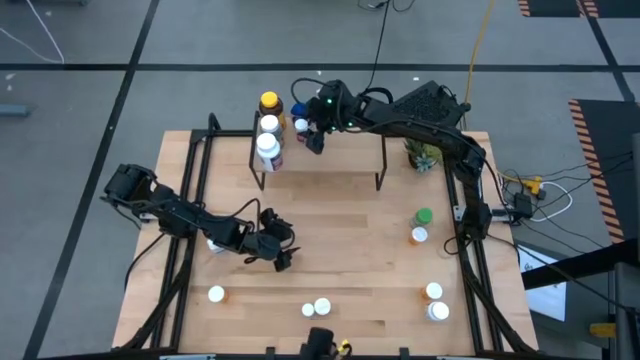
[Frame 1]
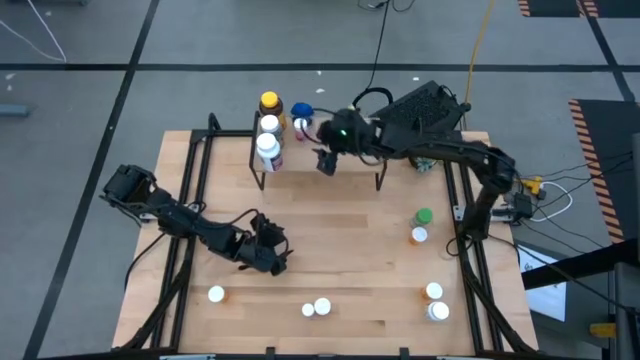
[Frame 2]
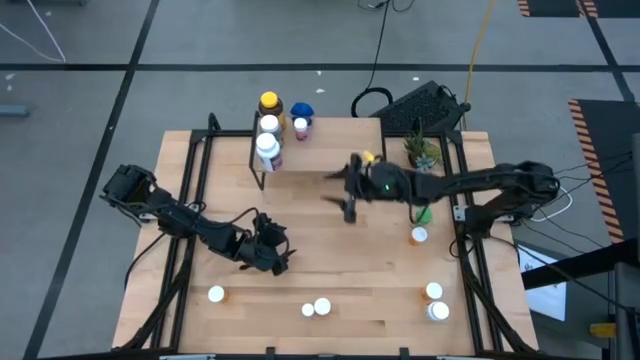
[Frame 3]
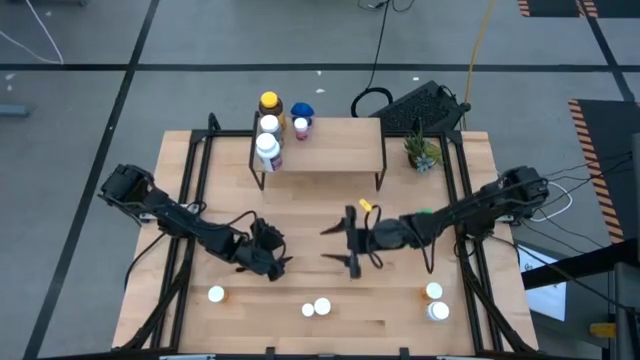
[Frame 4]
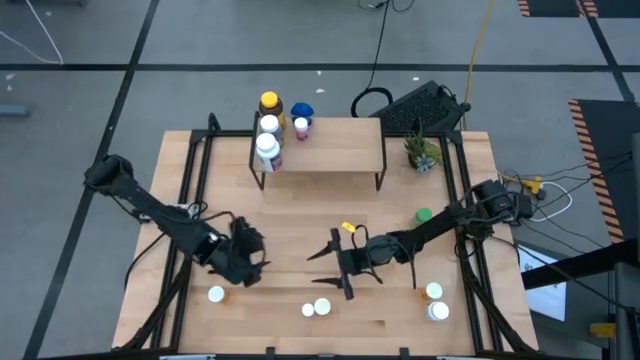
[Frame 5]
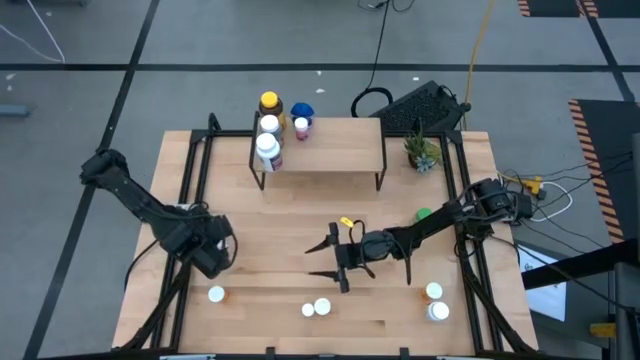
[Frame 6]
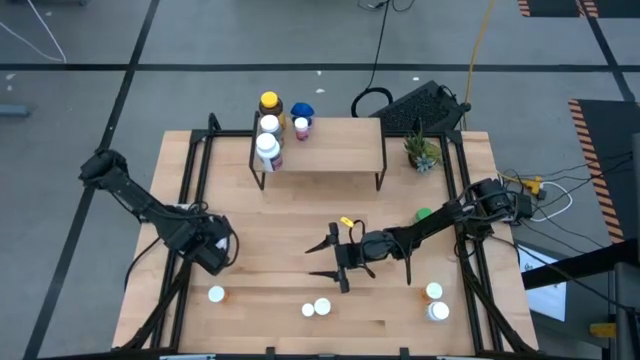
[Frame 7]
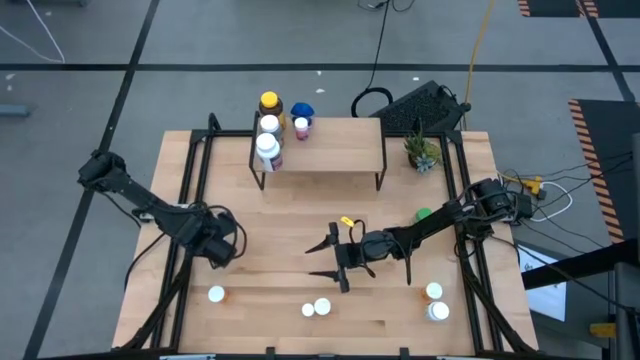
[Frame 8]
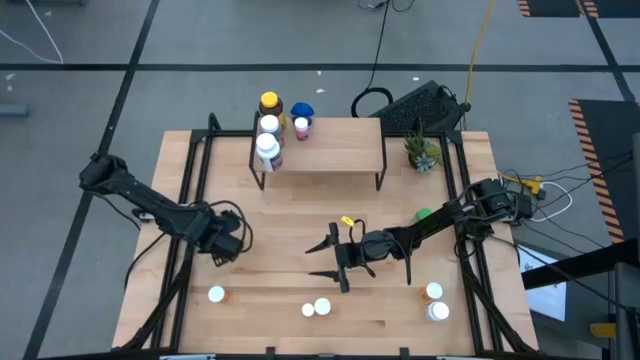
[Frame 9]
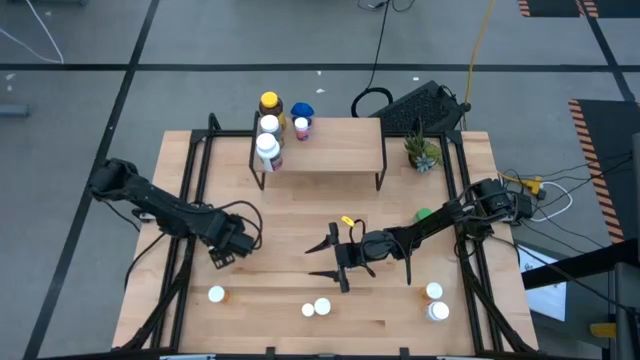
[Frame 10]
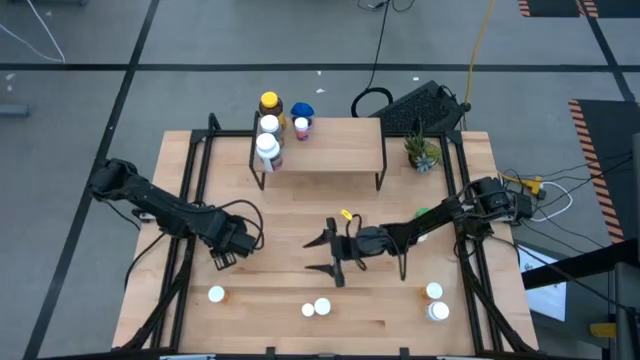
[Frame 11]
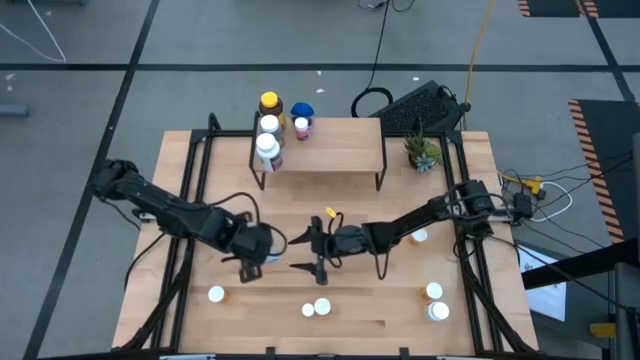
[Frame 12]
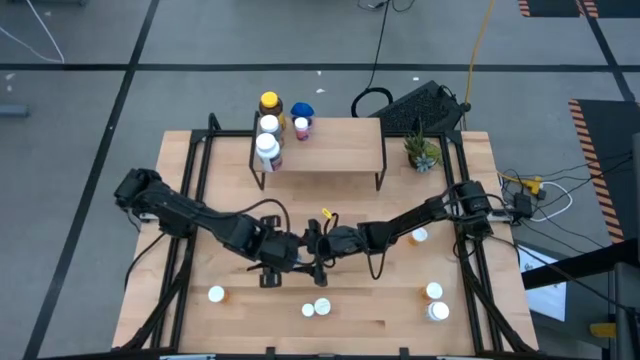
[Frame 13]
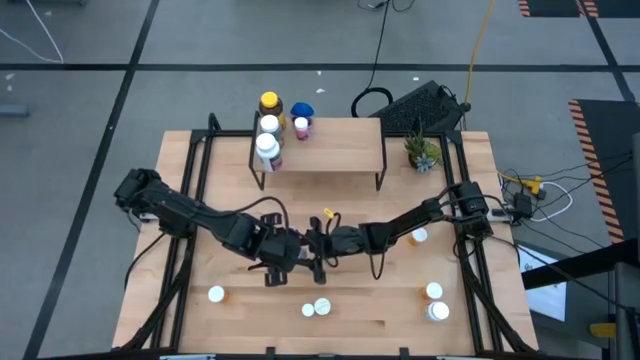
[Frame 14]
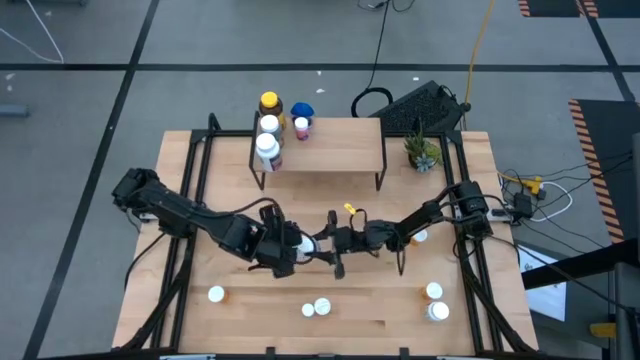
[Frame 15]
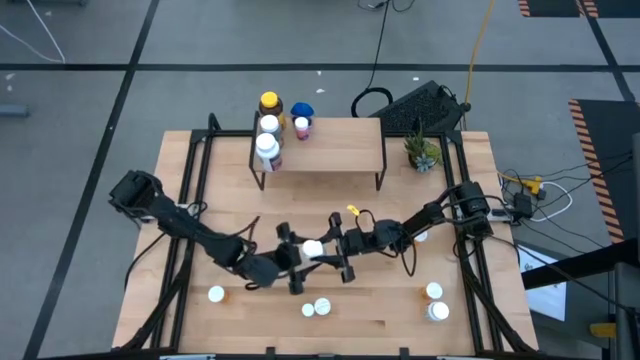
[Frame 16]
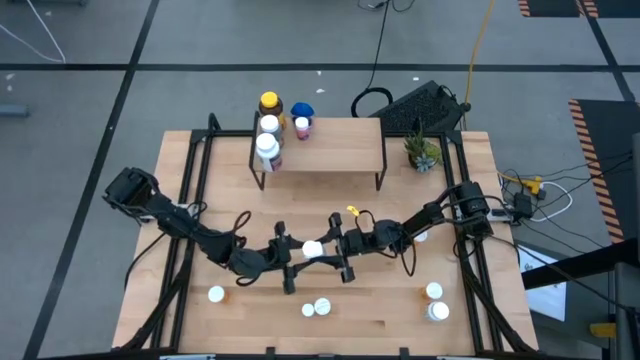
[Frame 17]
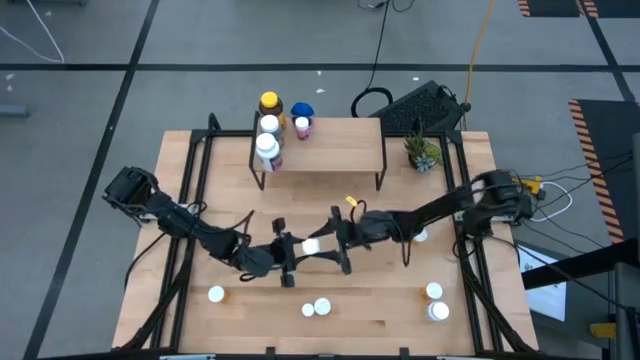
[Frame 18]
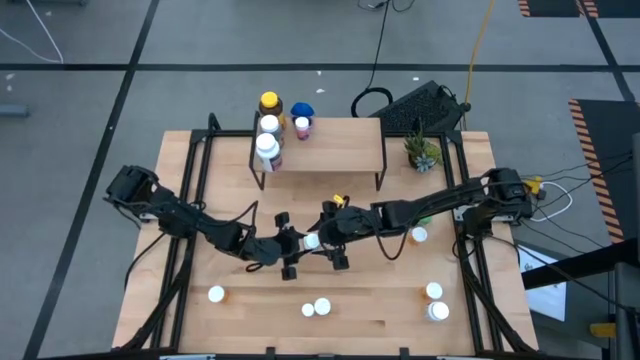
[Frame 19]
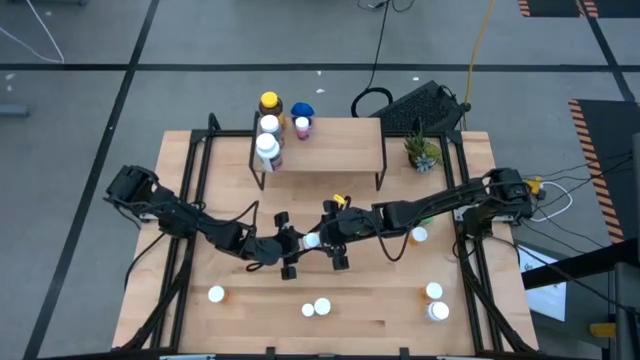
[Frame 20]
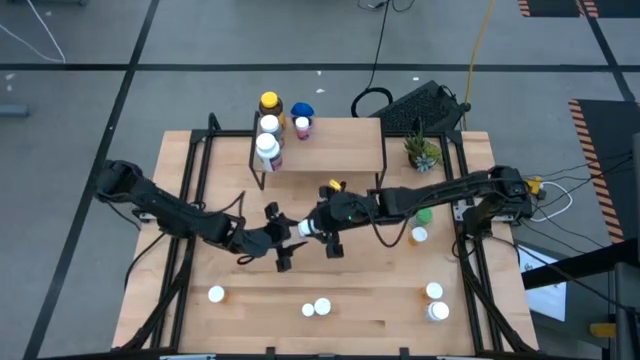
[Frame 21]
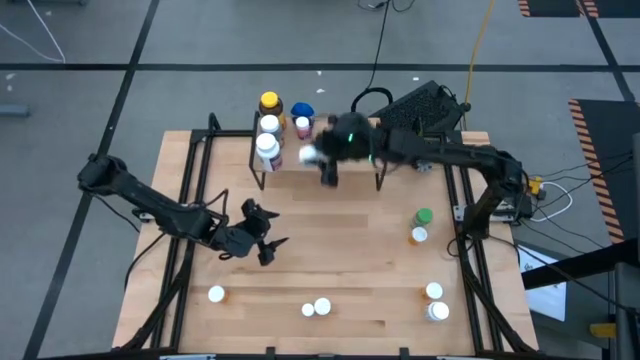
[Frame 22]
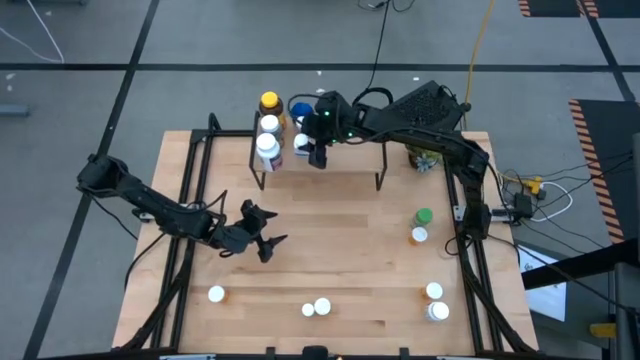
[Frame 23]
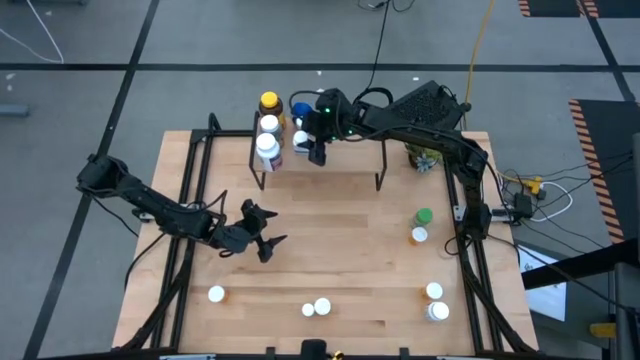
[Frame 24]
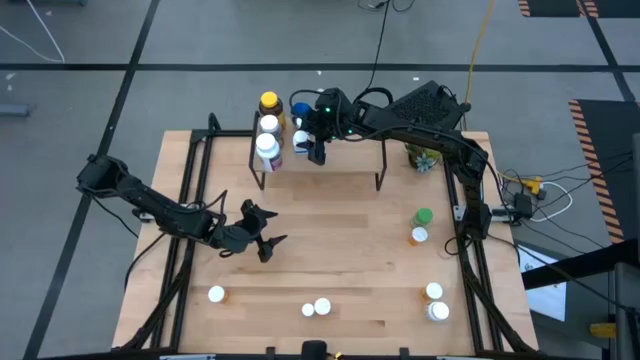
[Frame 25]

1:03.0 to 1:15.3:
Task: Pick and place medicine bottles onto shelf by color
Put the top small white medicine bottle on the shelf, aligned with the other blue and pink medicine bottles

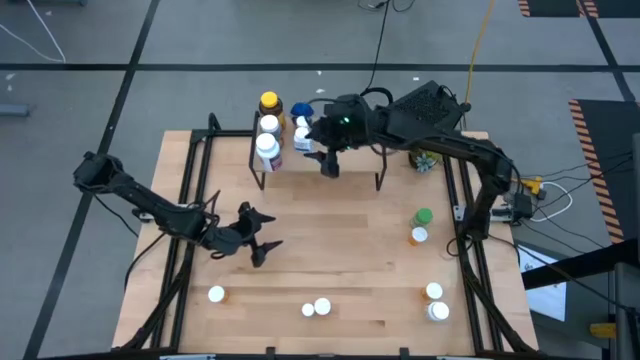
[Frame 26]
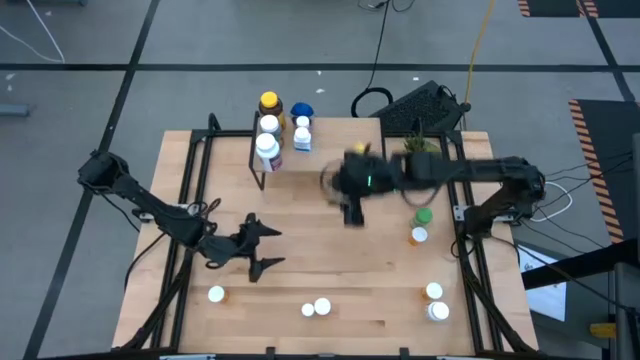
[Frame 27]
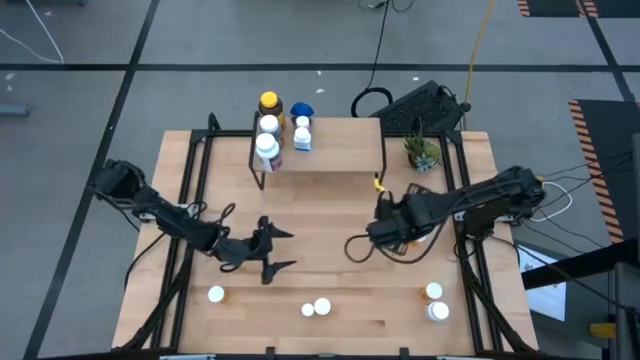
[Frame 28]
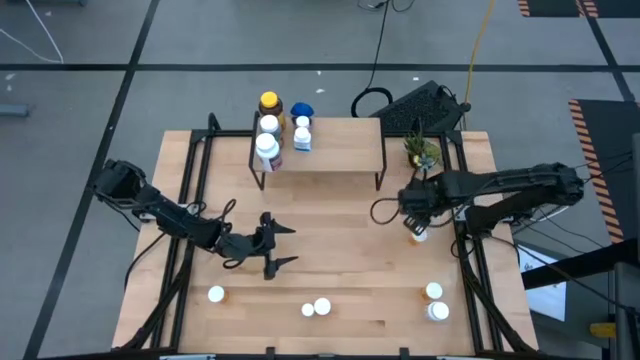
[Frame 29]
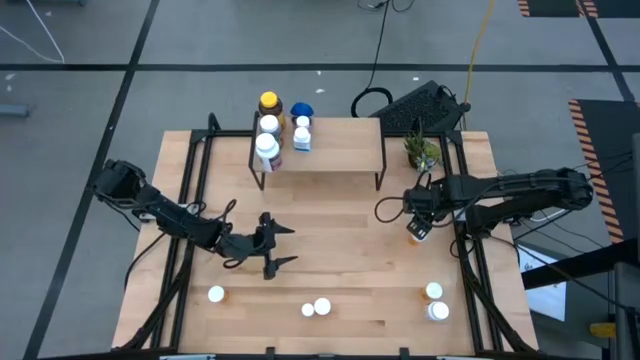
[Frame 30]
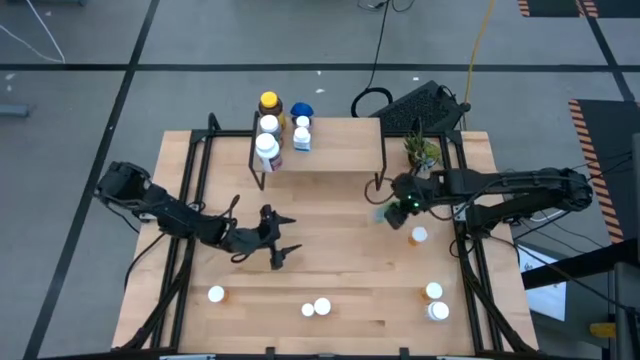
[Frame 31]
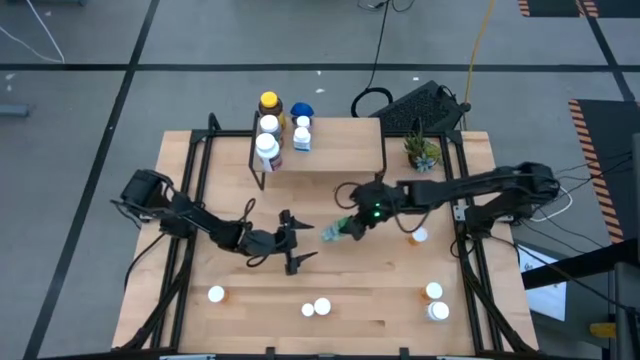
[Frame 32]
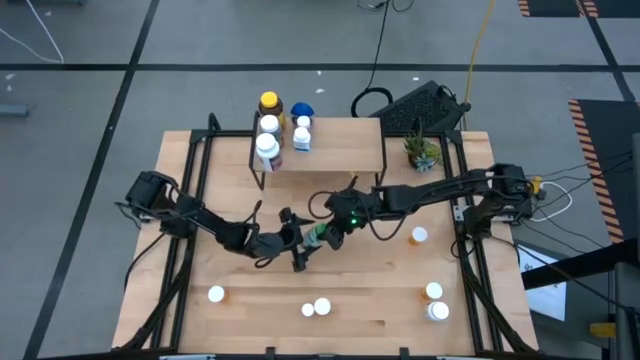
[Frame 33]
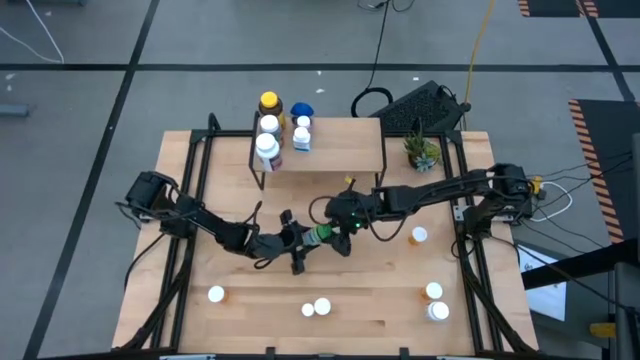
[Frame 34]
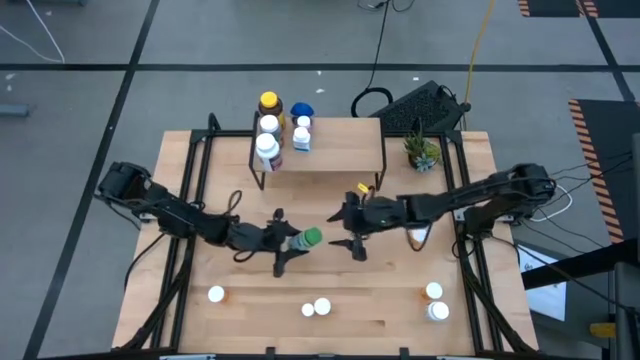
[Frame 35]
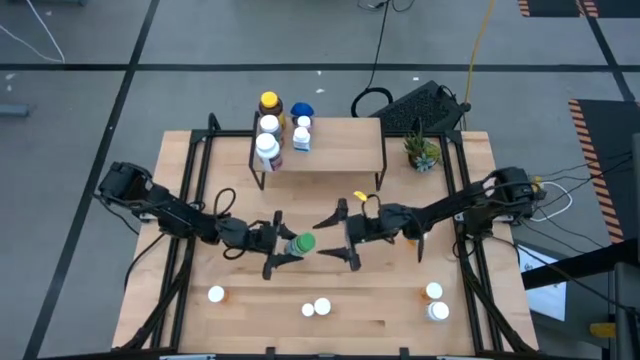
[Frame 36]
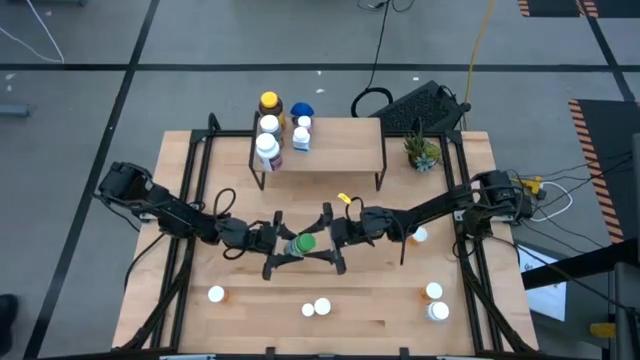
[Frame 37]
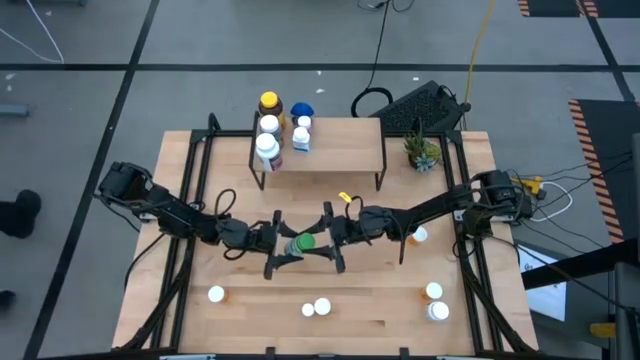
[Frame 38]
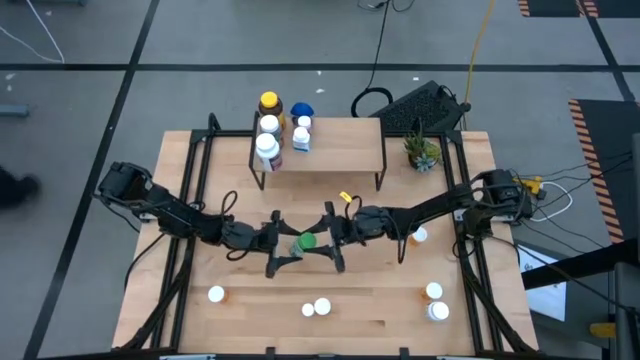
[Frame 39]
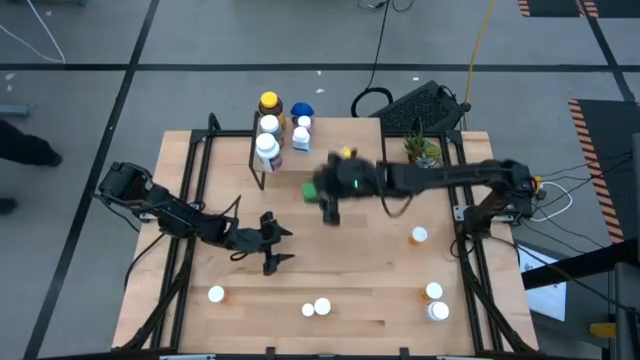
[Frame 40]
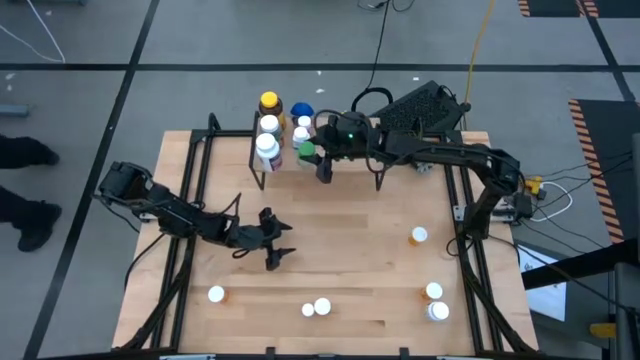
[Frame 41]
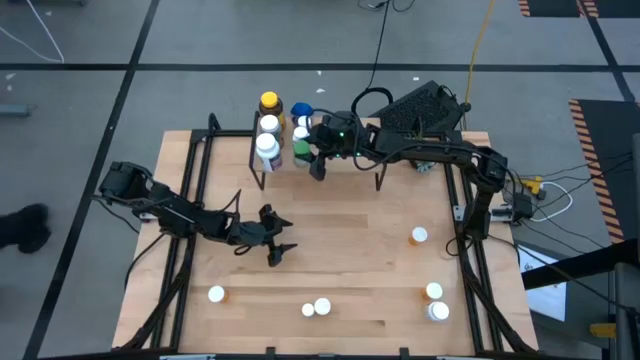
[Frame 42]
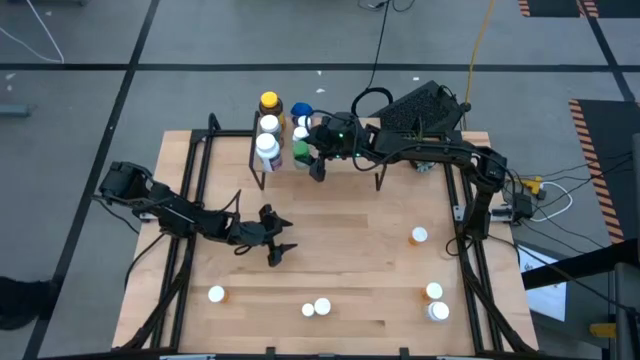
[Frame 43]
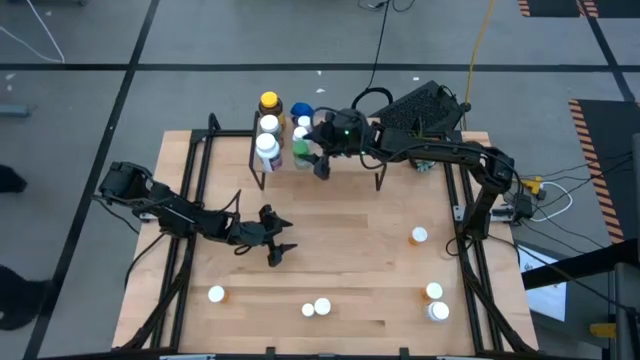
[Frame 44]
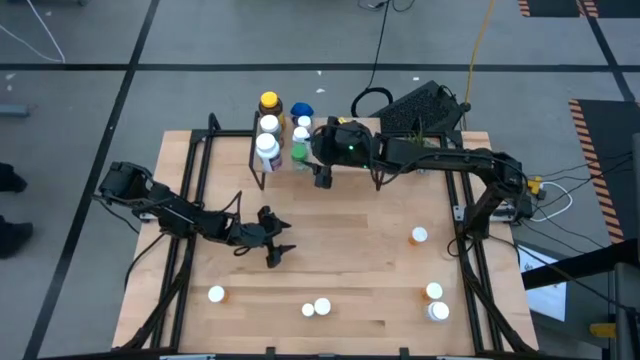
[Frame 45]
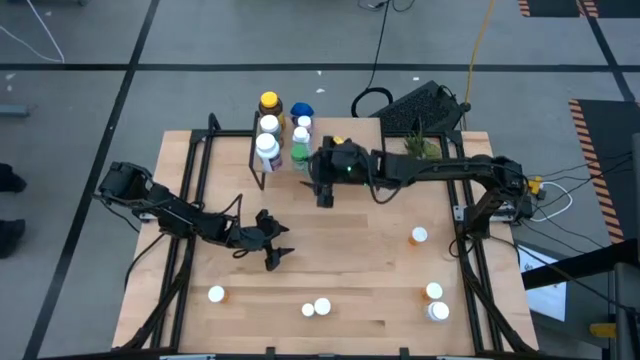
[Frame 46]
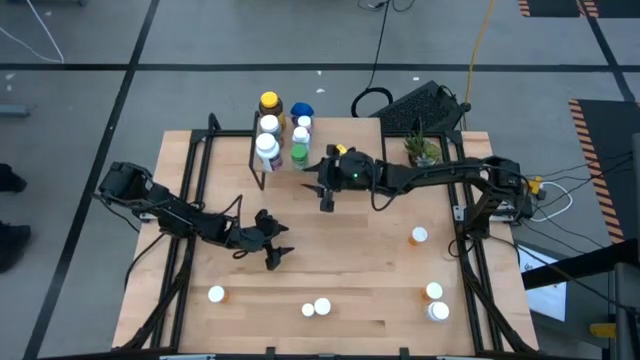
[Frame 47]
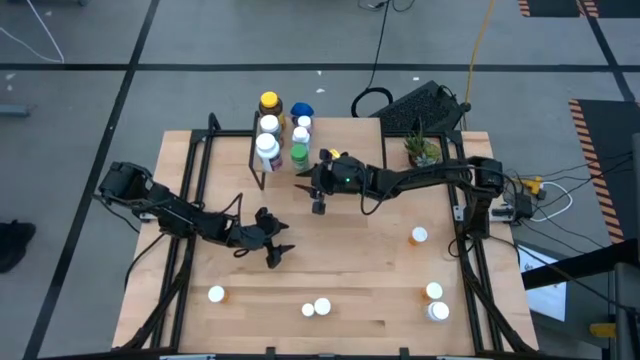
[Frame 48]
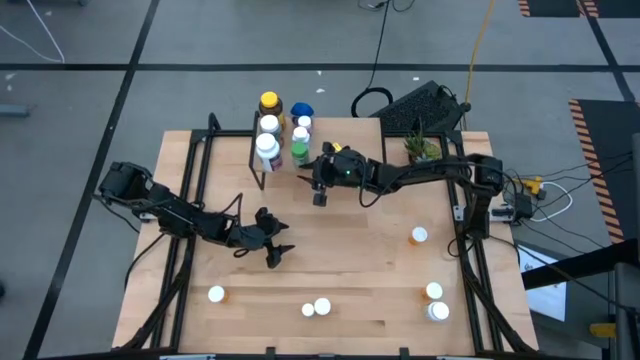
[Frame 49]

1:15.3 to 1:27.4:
Put the small green medicine bottle on the shelf, aligned with the other blue, pink and white medicine bottle
